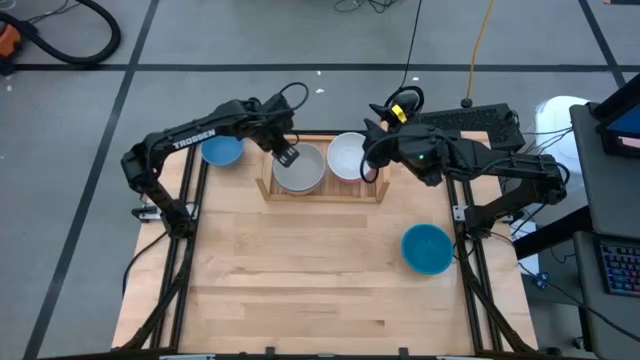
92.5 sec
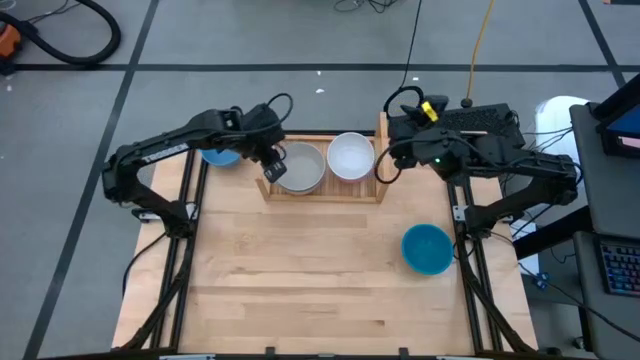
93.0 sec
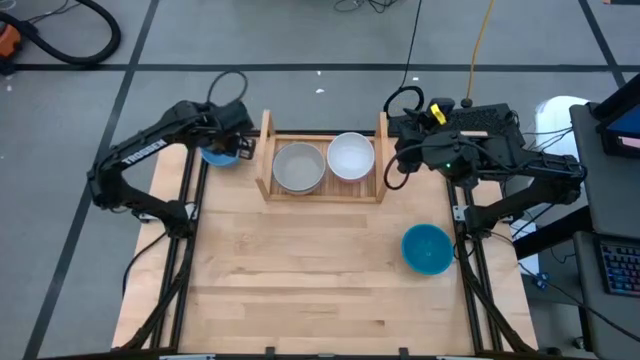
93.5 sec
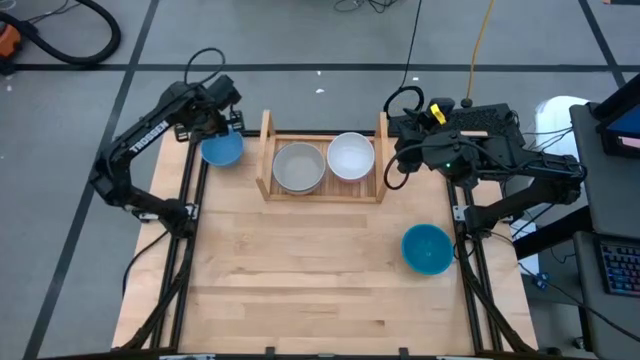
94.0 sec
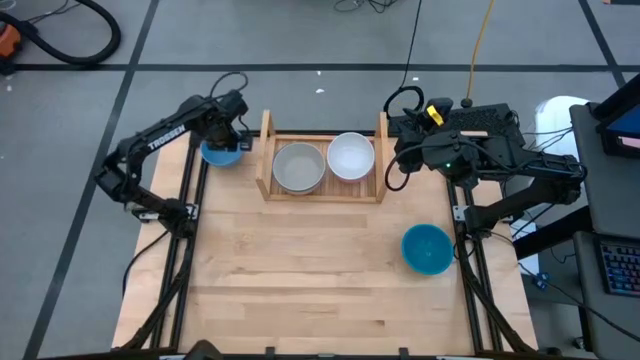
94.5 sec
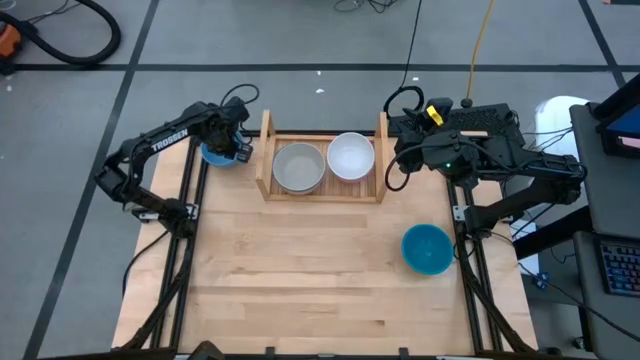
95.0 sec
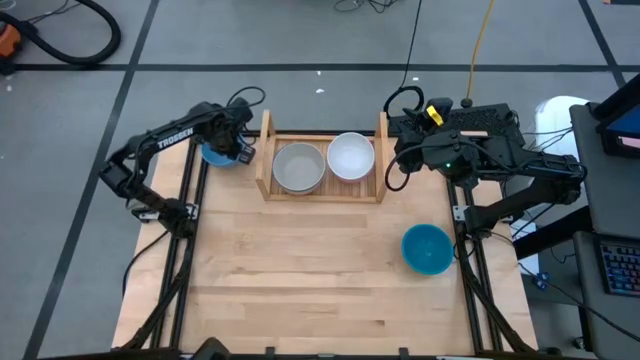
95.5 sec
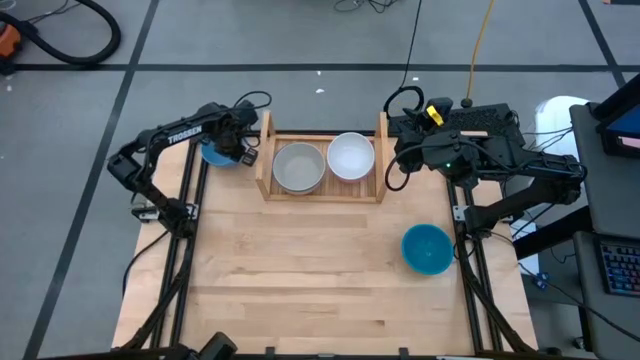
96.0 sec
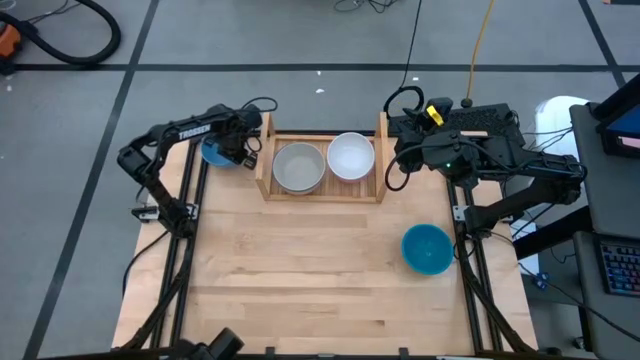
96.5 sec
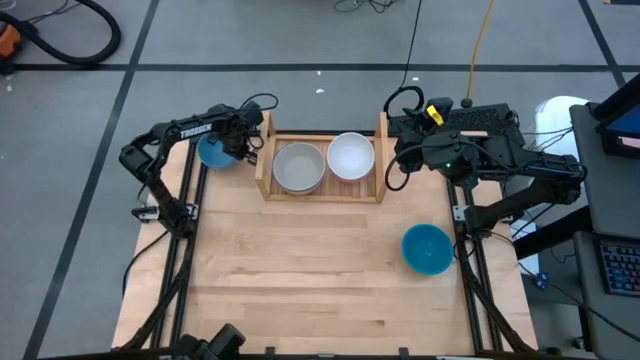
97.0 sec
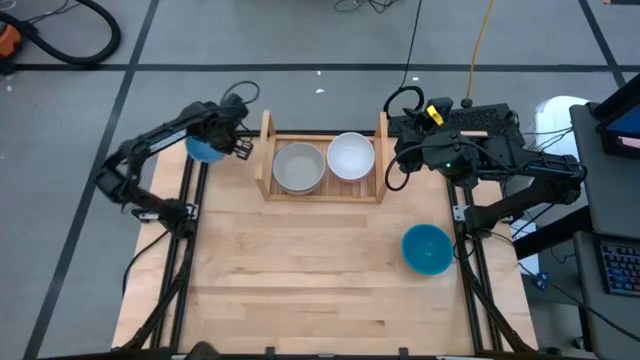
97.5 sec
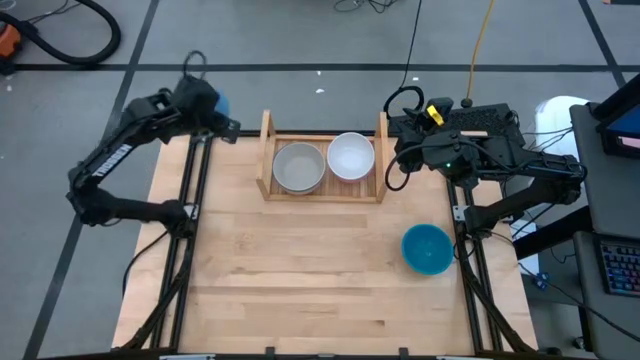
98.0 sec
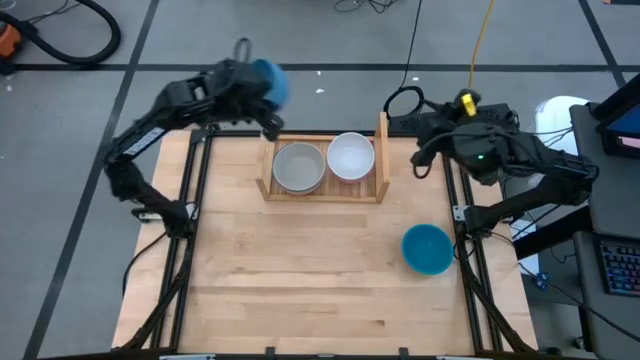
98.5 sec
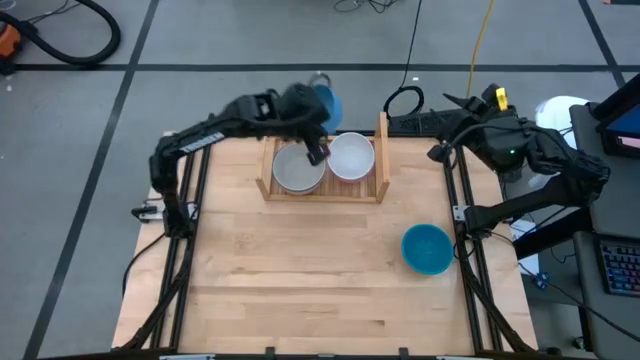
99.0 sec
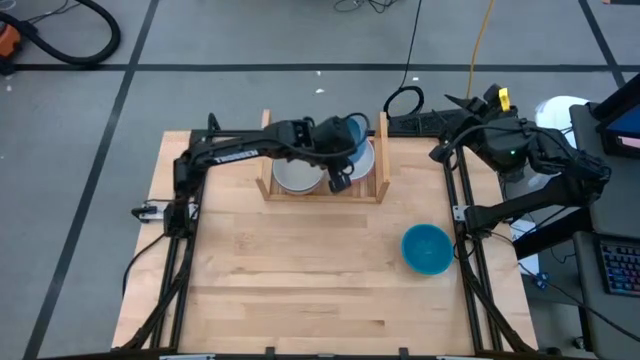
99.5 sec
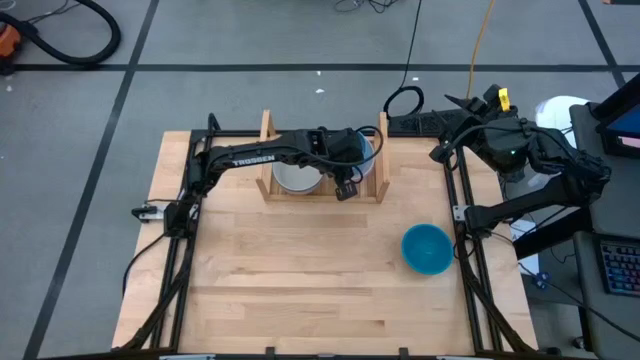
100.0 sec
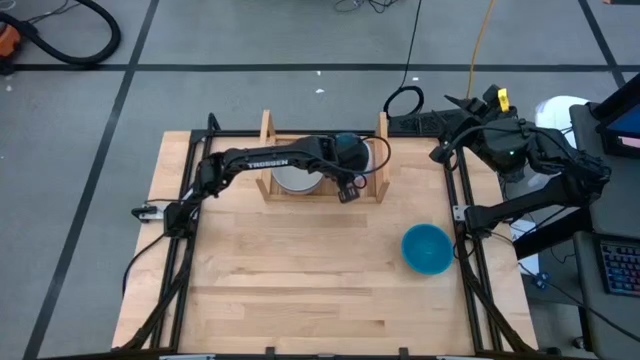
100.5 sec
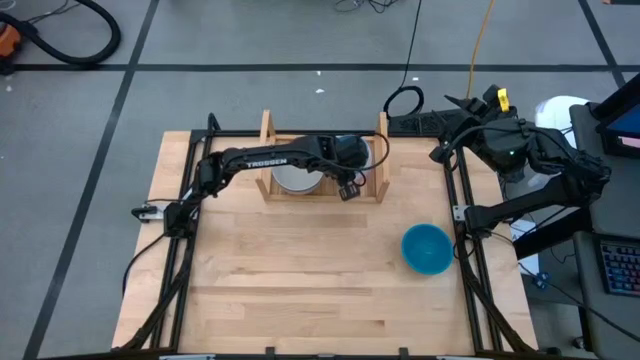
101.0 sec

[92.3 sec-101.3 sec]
Task: Place and stack bowls onto a shelf
Stack the light blue bowl on top of the white bowl on the shelf

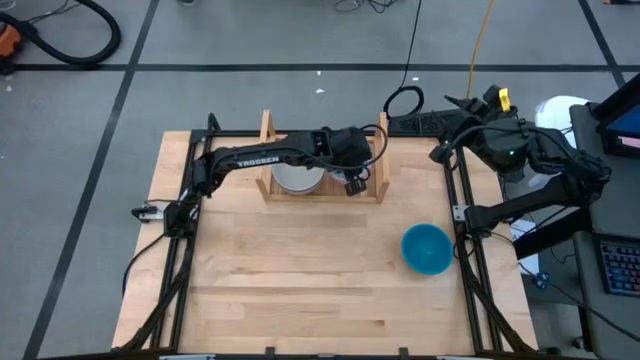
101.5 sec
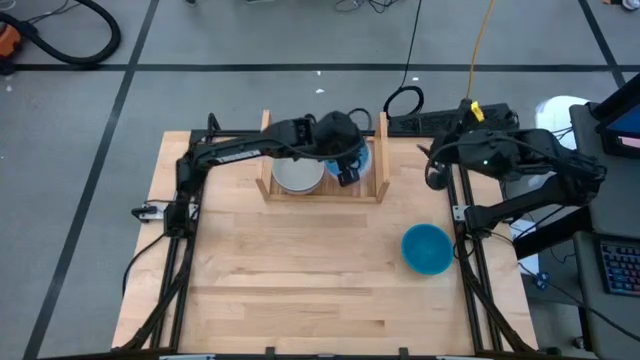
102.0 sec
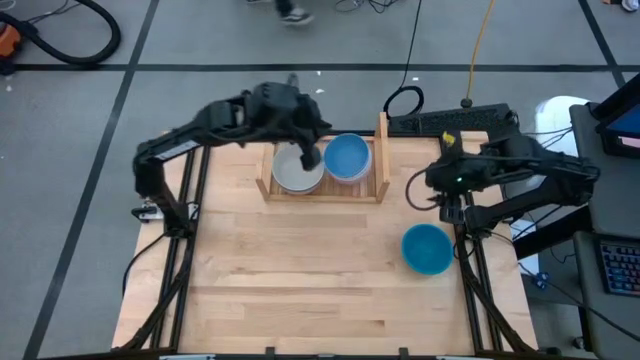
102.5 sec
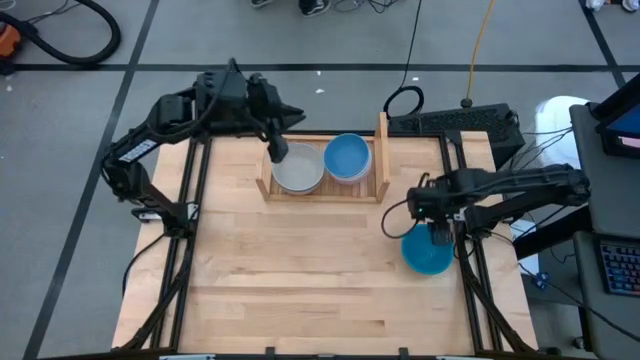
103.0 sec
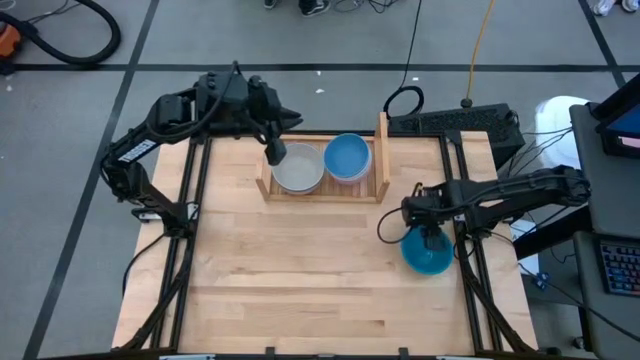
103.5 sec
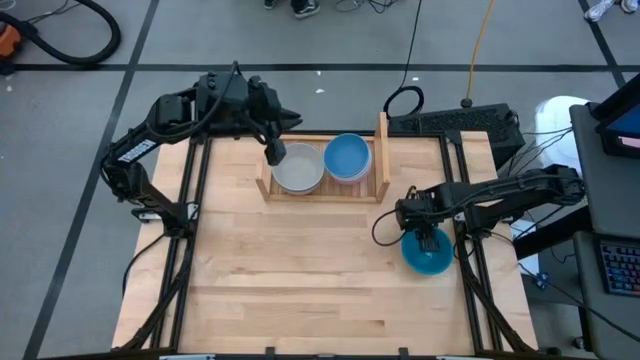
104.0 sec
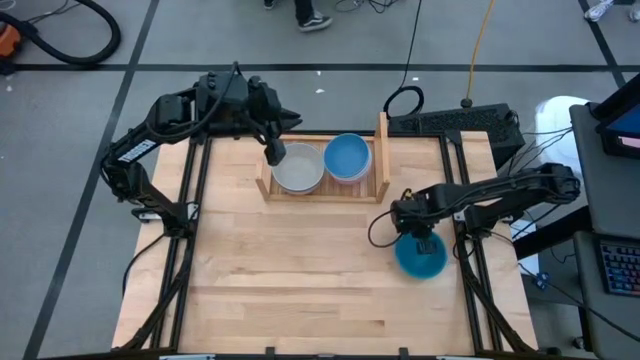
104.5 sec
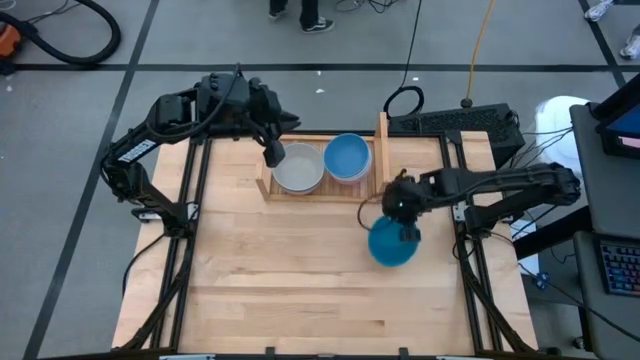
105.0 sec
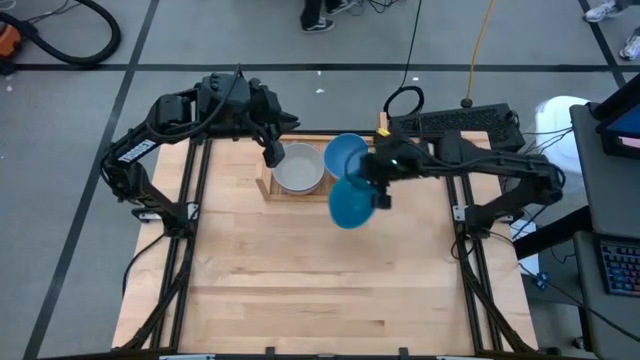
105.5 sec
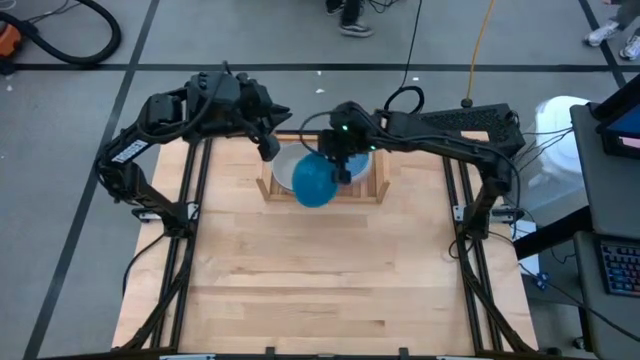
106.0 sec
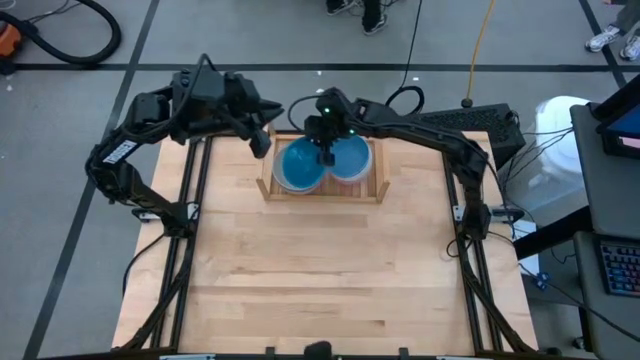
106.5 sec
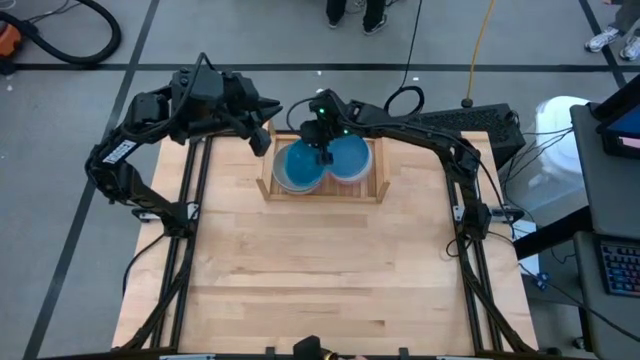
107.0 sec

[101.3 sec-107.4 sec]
Stack the blue bowl on top of the gray bowl on the shelf

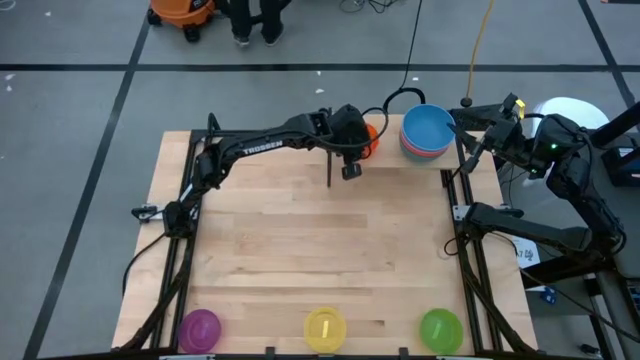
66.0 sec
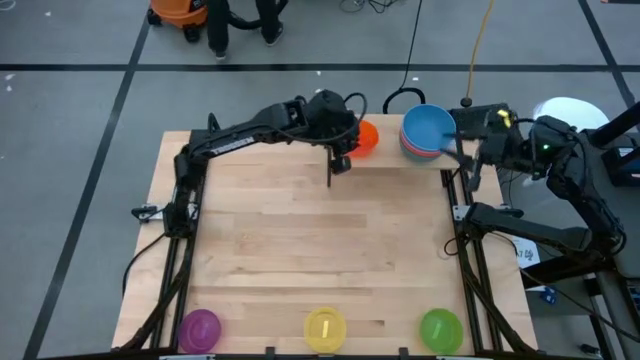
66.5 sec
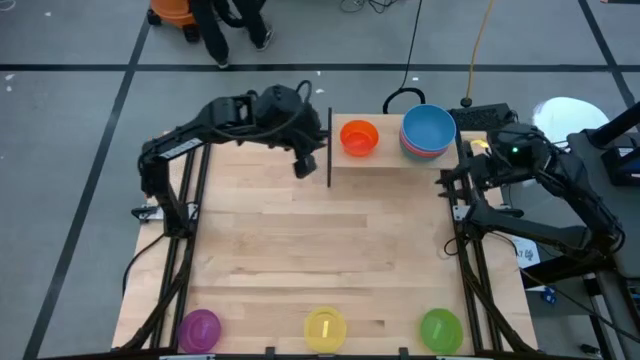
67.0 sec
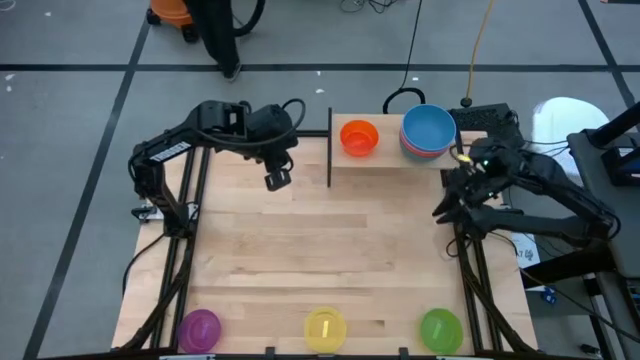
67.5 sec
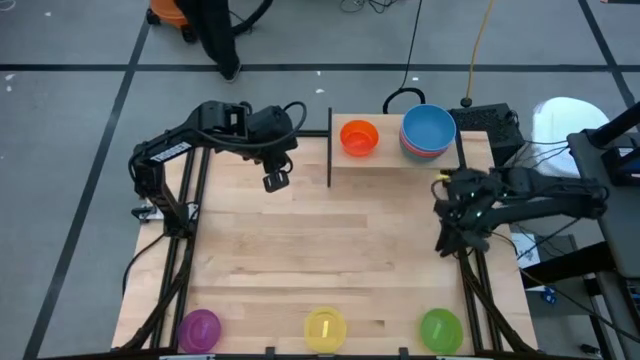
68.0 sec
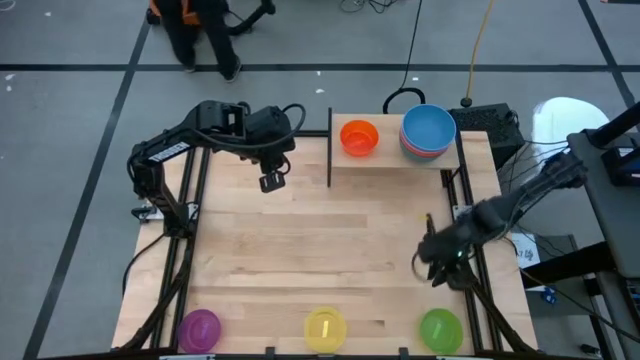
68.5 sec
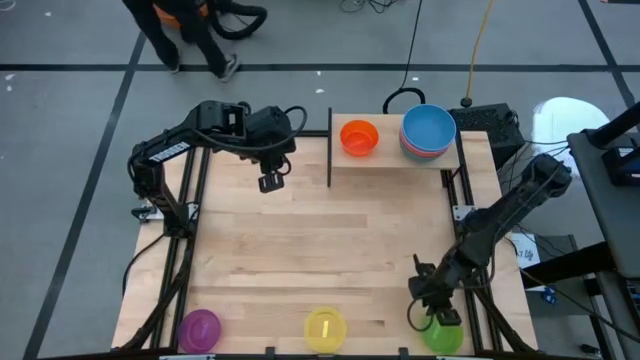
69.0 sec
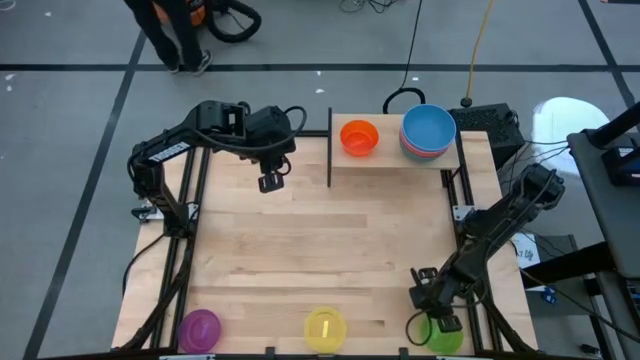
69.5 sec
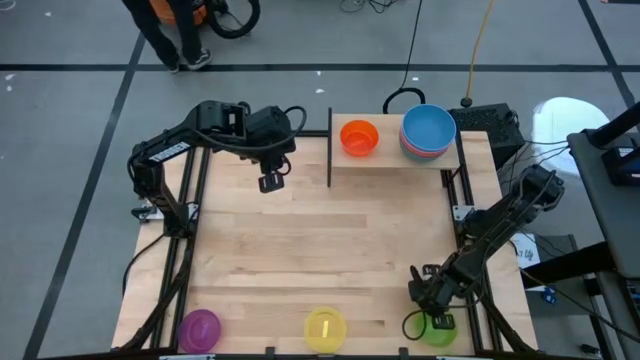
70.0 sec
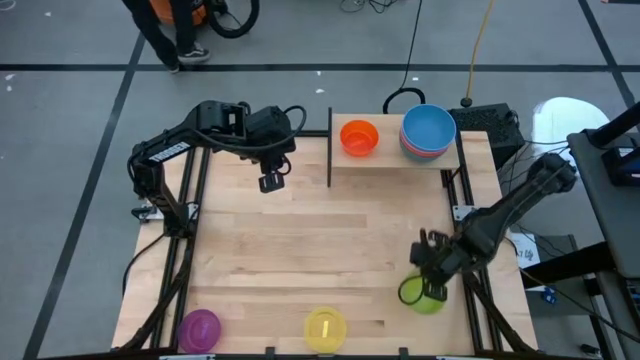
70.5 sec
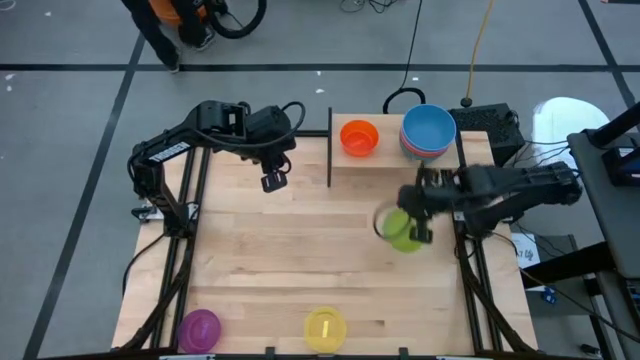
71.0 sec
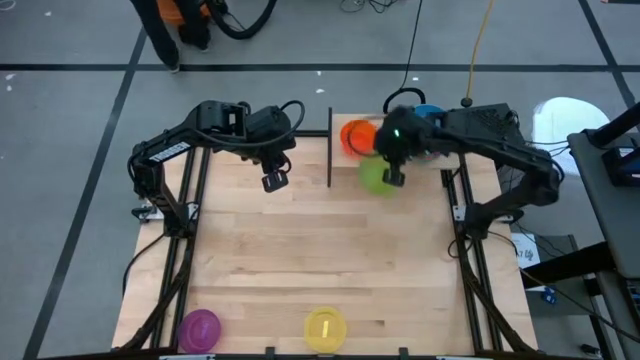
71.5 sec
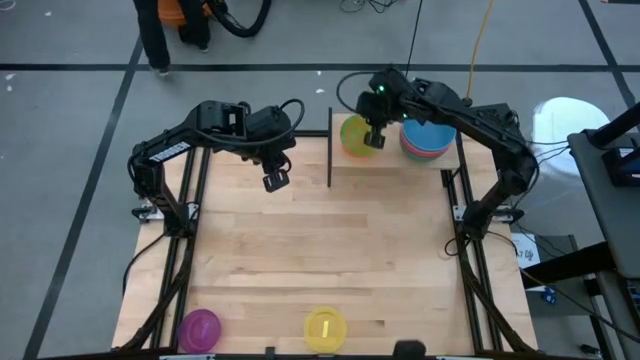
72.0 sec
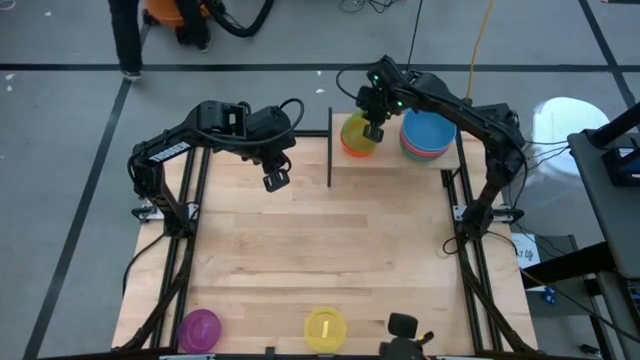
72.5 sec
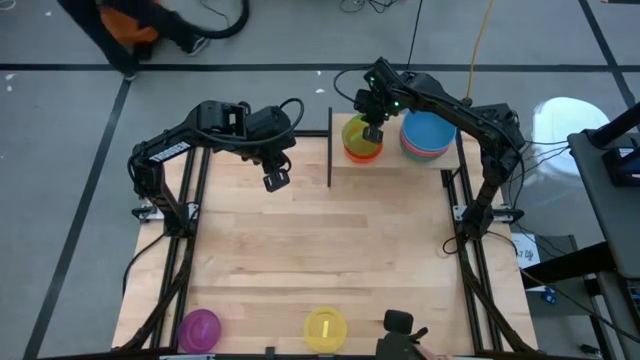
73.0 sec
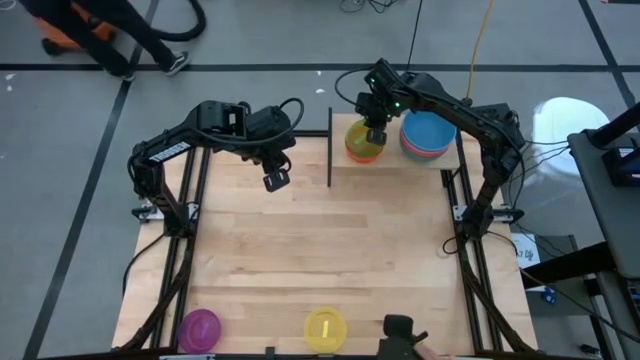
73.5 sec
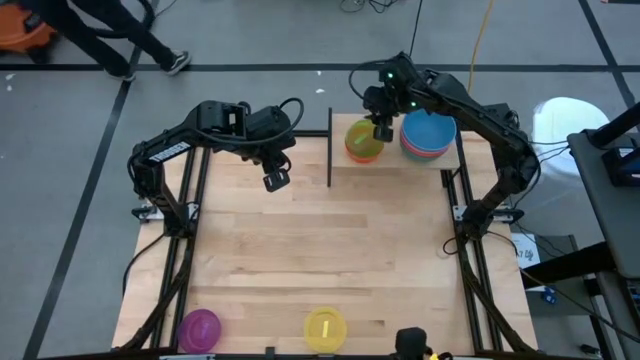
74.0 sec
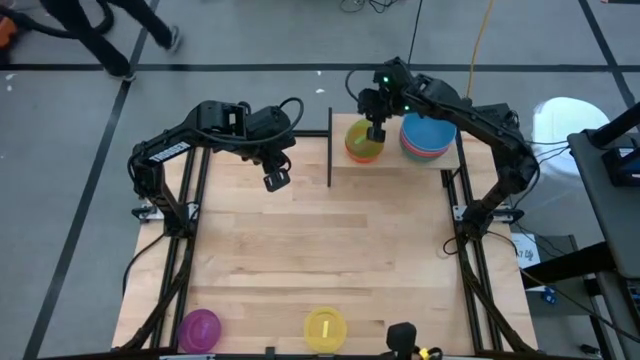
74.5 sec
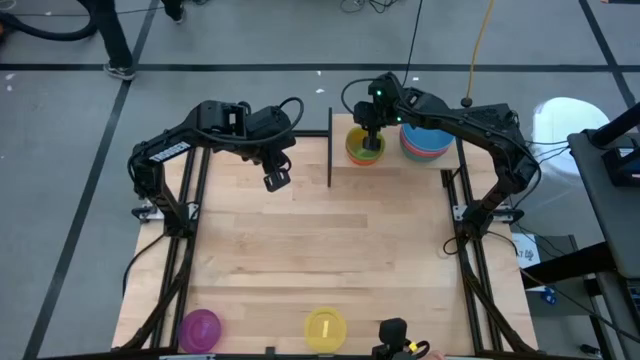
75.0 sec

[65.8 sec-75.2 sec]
Task: Place and stack bowls onto a shelf
Stack the green bowl on the orange bowl on the shelf
